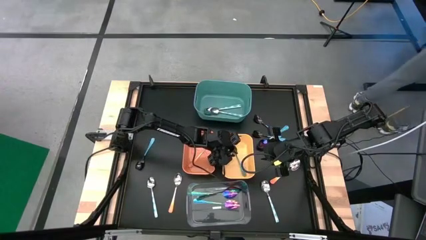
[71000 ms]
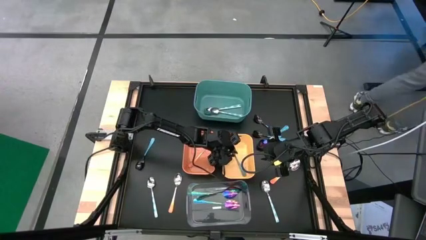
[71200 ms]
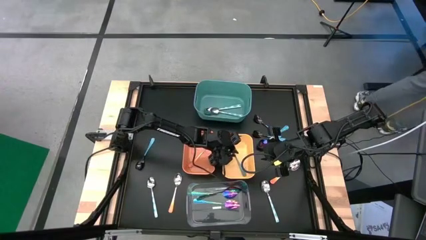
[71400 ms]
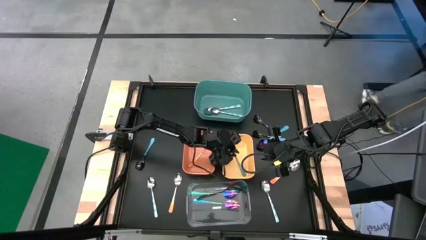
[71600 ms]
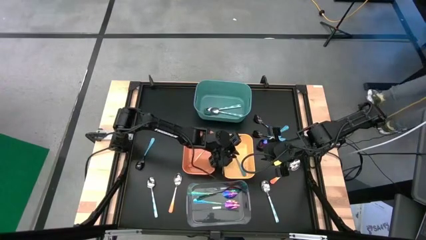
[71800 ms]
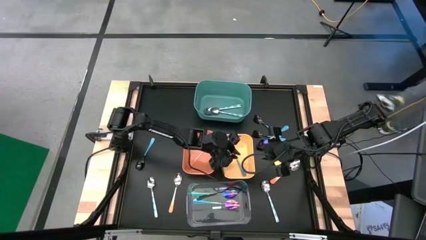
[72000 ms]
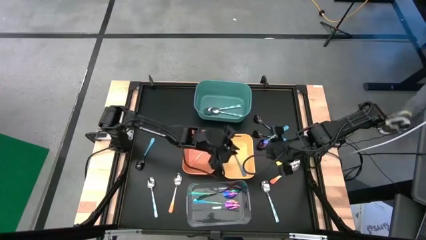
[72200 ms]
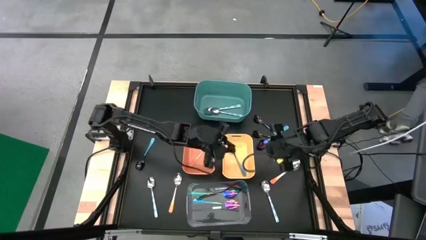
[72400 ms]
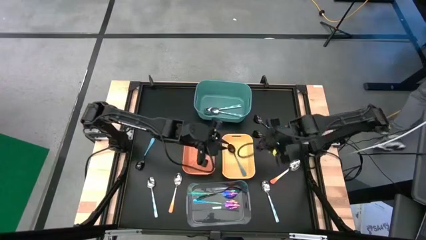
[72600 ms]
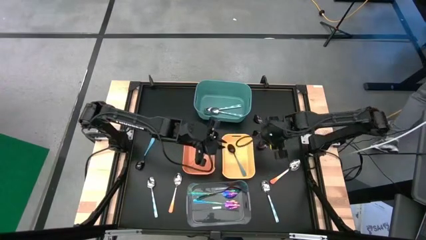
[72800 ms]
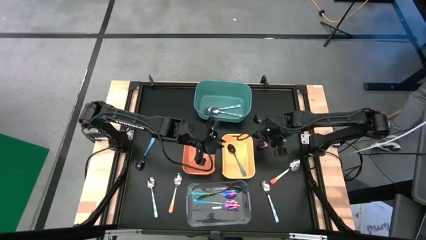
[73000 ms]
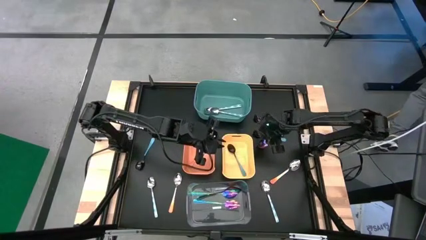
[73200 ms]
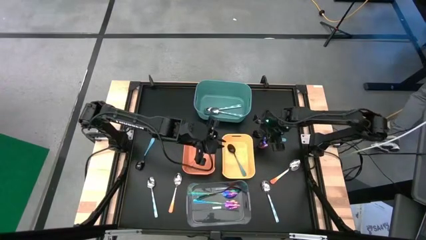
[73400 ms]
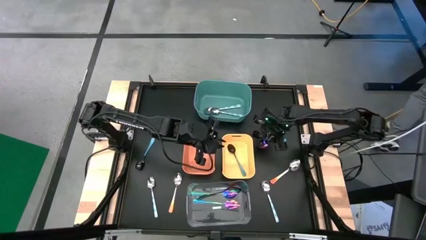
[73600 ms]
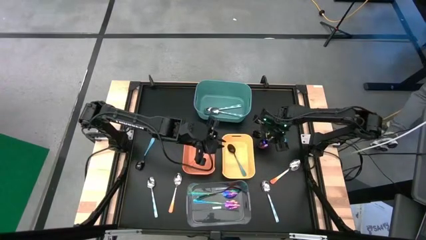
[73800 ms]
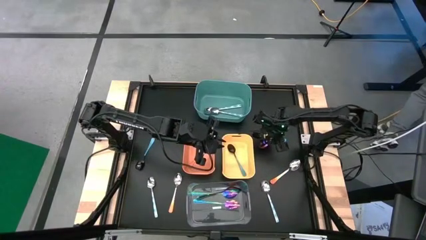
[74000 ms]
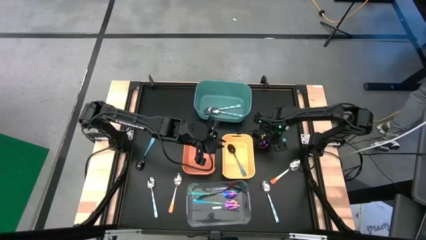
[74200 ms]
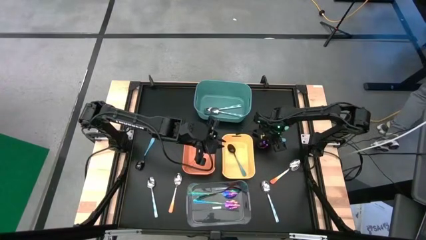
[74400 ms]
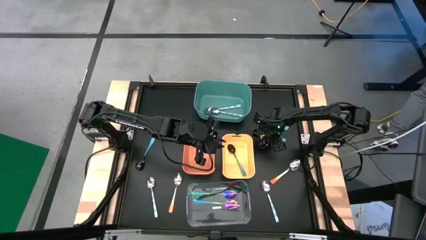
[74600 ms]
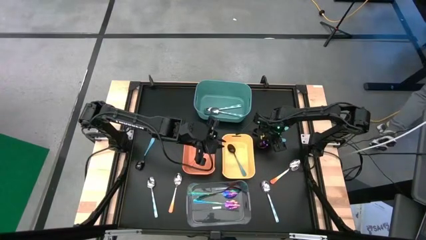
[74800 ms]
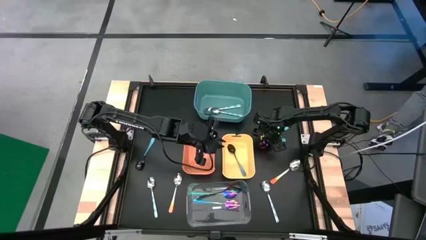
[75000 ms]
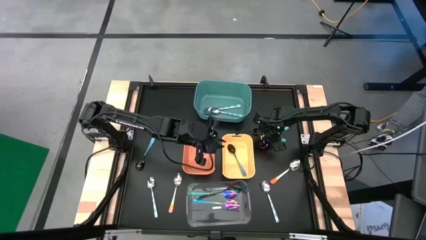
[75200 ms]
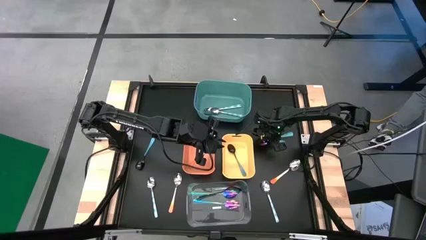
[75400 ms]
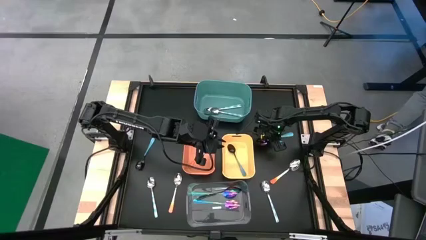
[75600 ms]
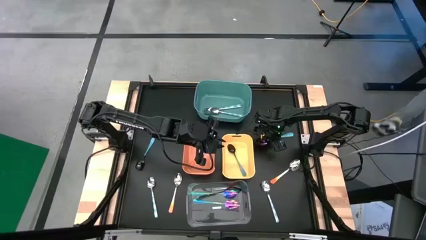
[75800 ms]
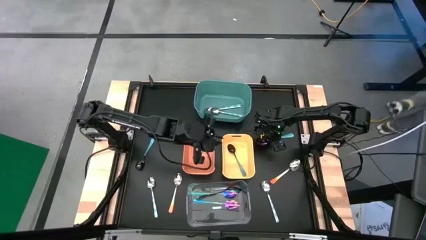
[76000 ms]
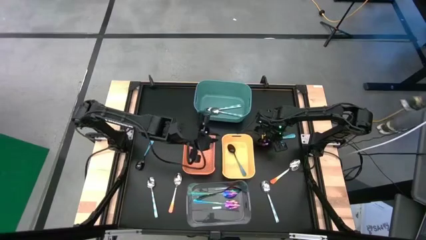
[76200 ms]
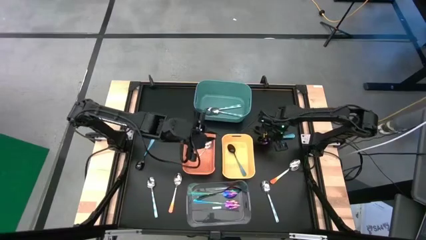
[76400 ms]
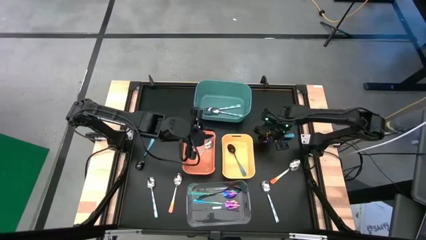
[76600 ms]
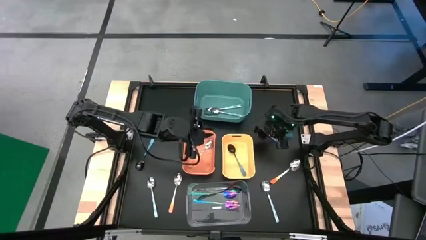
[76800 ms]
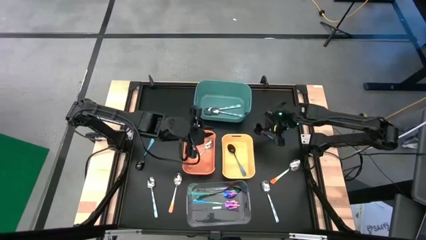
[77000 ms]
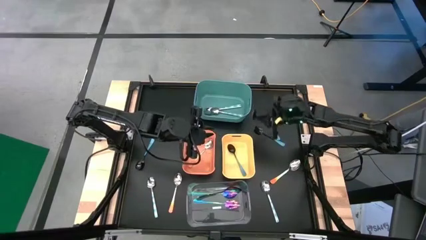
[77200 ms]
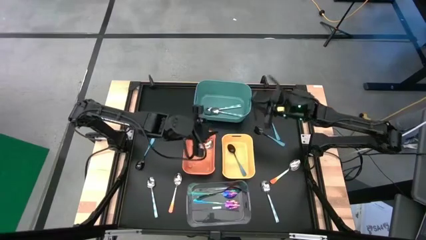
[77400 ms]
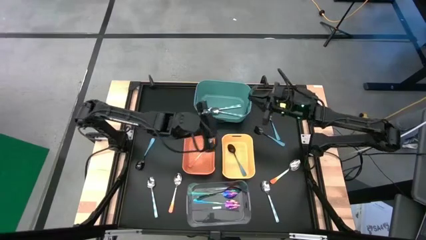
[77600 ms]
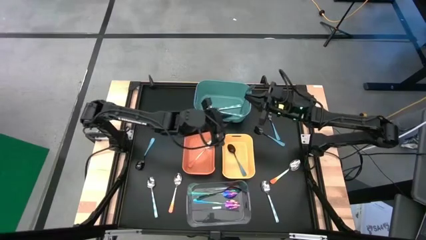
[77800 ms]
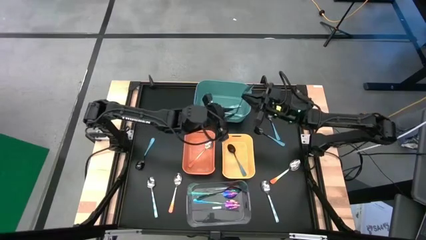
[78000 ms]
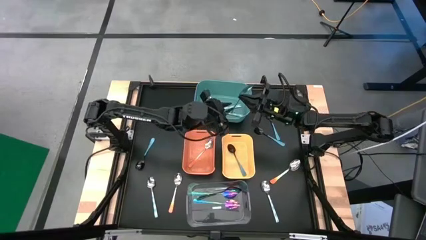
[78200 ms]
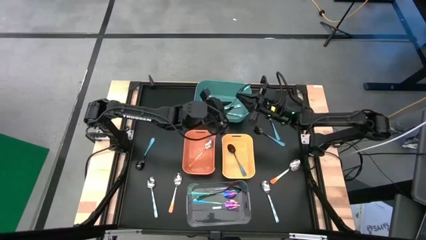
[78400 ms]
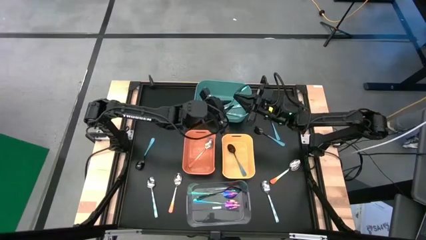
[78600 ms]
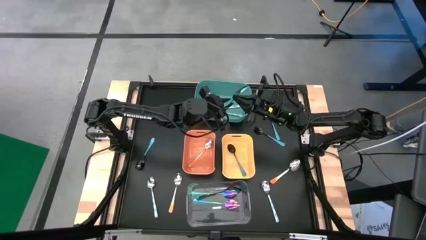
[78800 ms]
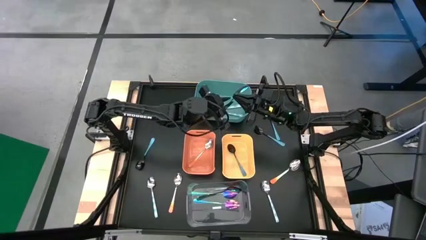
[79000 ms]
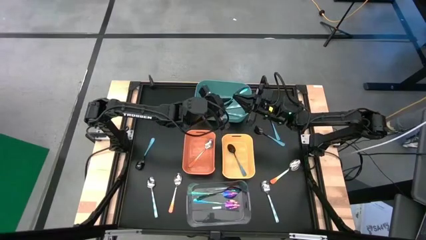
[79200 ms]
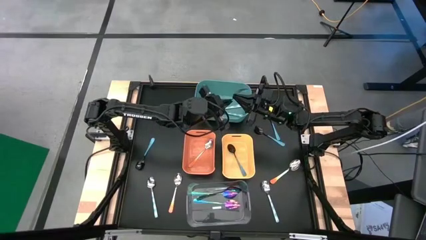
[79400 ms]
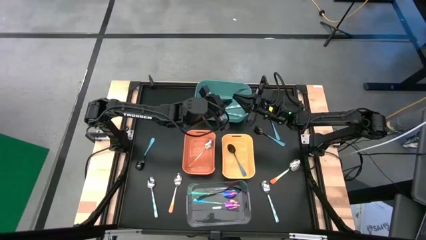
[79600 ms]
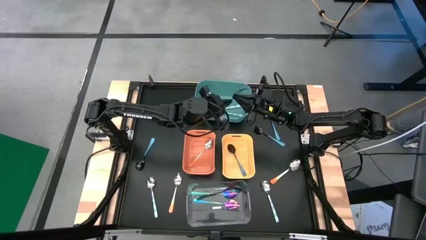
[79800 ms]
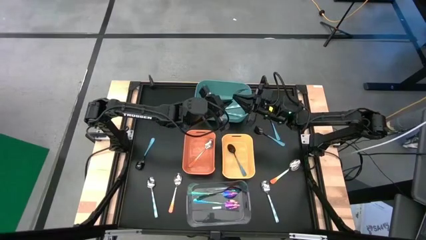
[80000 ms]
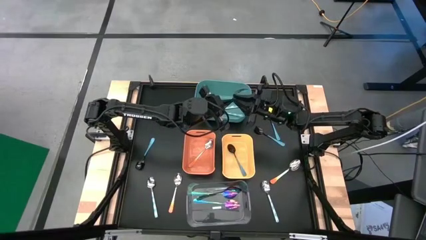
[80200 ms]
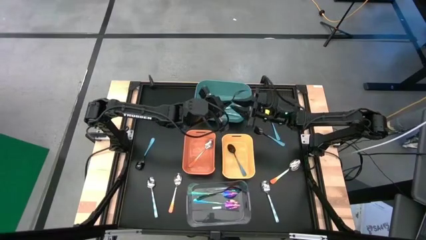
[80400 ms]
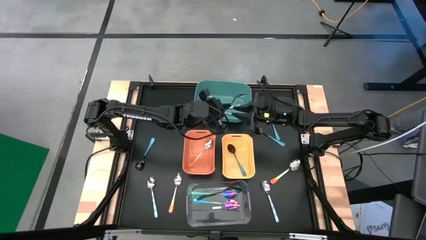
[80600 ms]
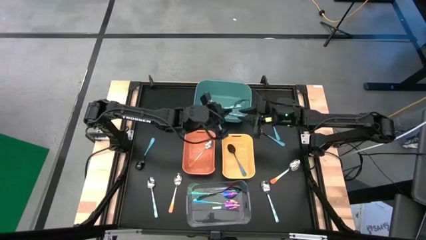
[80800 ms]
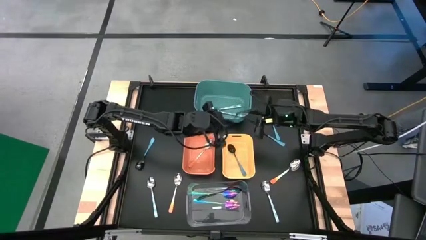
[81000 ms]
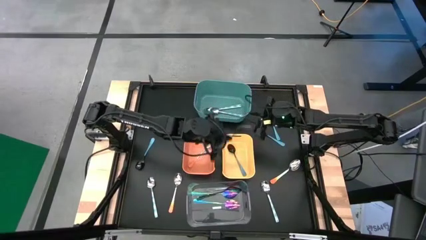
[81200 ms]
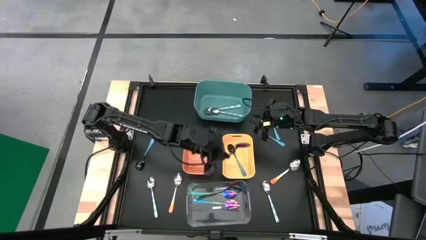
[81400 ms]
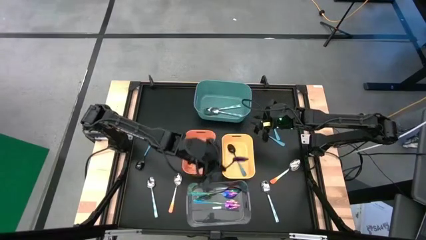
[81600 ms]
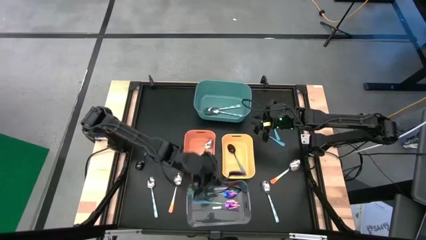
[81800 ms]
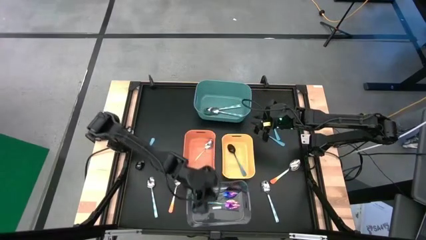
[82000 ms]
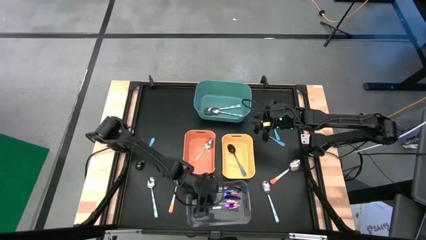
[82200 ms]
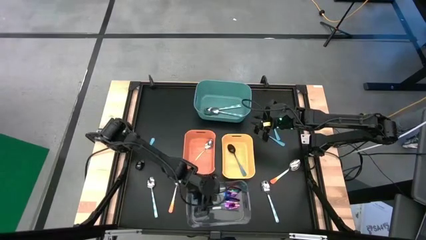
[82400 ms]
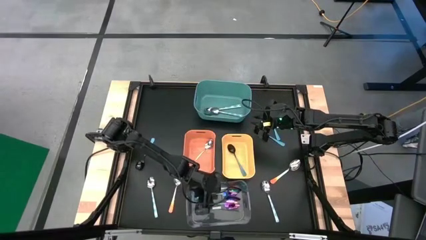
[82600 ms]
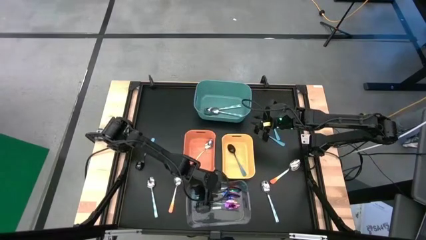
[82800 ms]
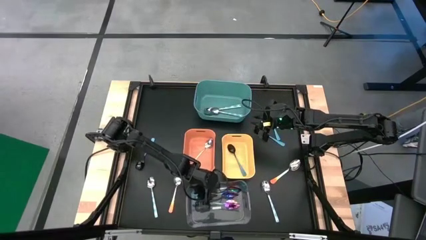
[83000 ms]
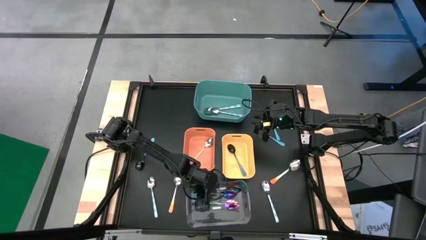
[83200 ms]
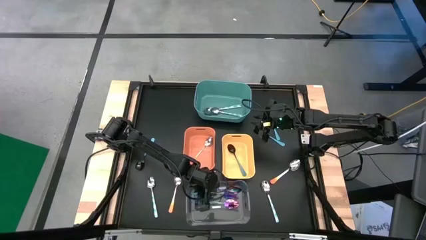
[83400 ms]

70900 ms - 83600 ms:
Task: Sort silverware by color (type)
Put the blue spoon into the transparent bin
